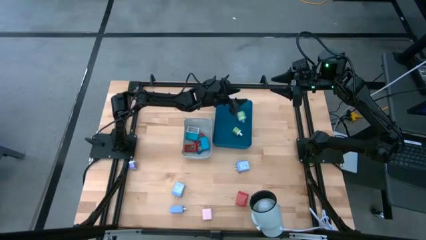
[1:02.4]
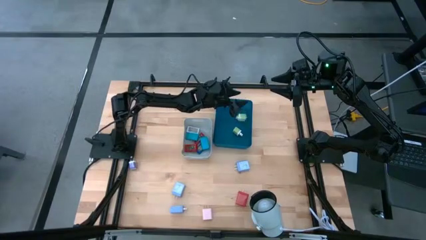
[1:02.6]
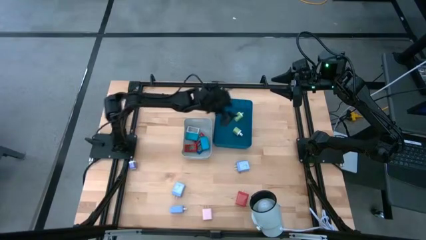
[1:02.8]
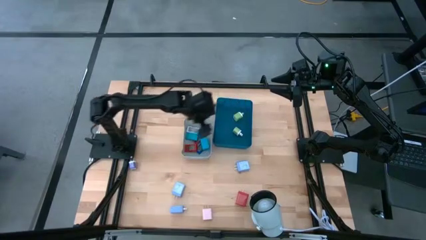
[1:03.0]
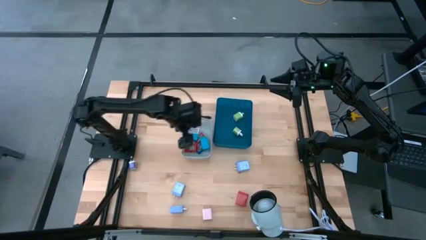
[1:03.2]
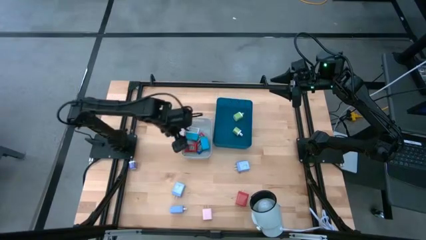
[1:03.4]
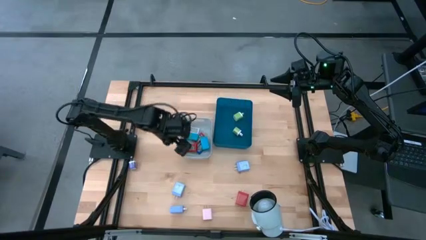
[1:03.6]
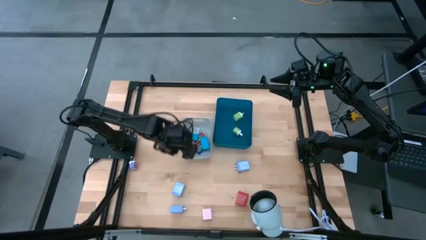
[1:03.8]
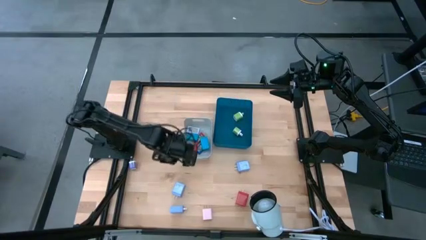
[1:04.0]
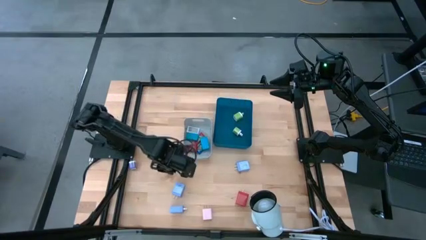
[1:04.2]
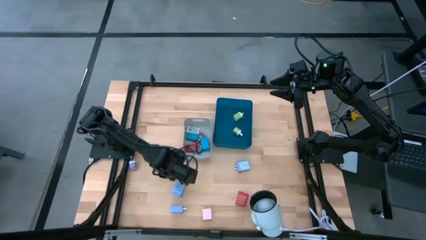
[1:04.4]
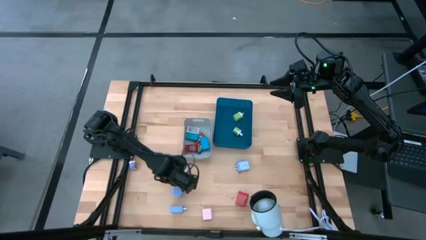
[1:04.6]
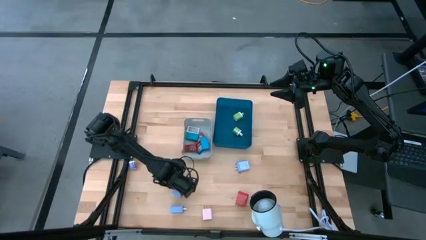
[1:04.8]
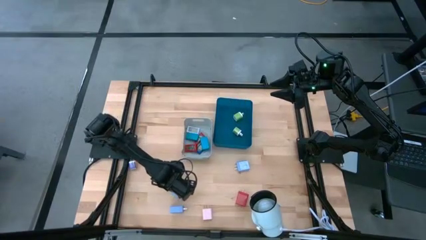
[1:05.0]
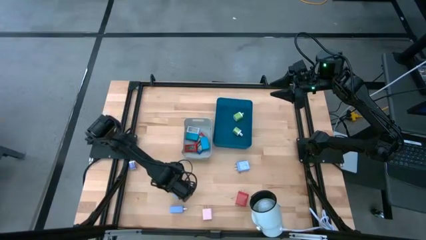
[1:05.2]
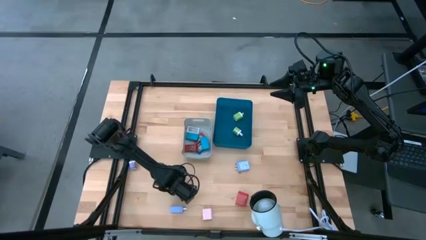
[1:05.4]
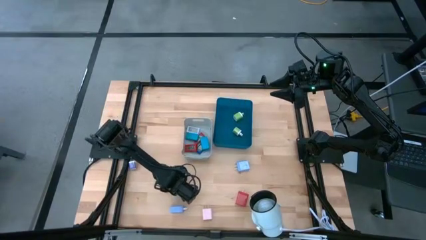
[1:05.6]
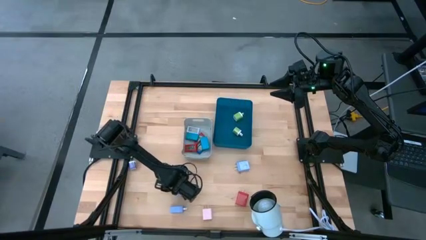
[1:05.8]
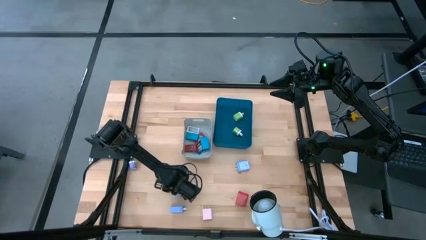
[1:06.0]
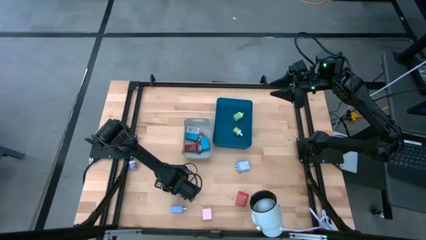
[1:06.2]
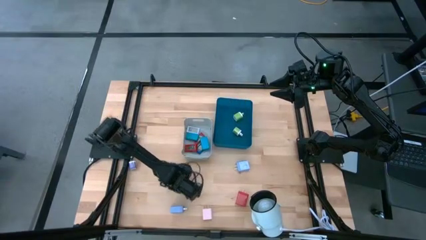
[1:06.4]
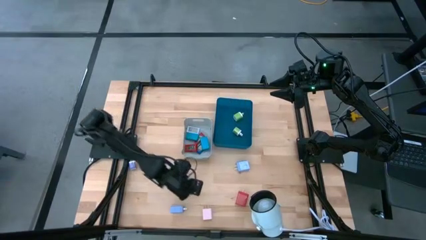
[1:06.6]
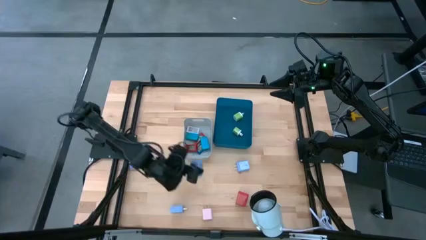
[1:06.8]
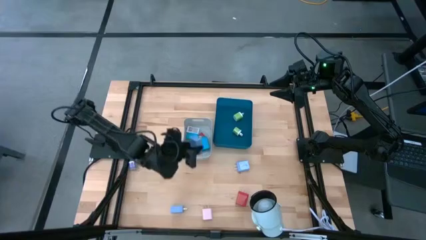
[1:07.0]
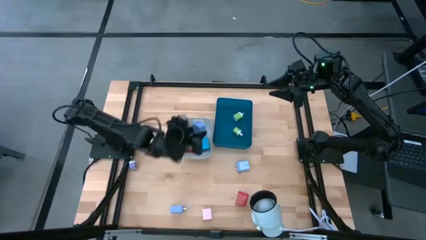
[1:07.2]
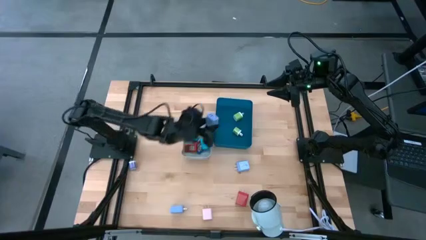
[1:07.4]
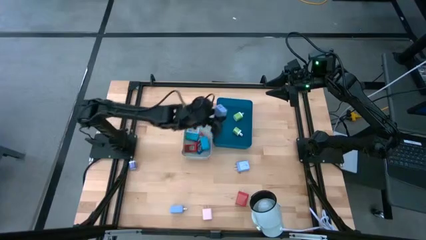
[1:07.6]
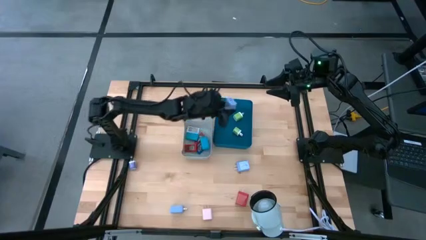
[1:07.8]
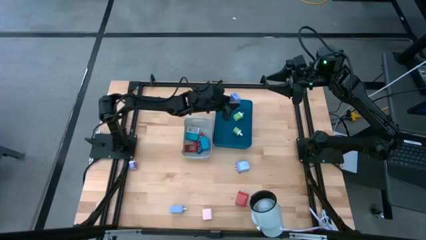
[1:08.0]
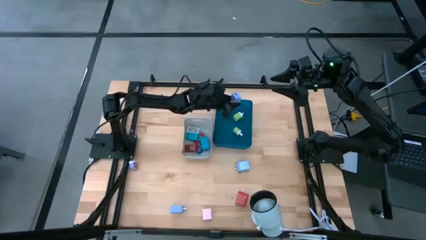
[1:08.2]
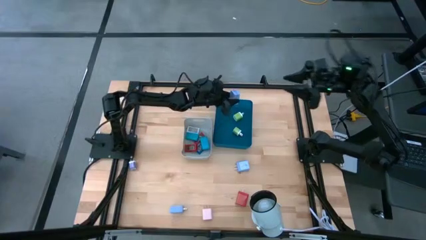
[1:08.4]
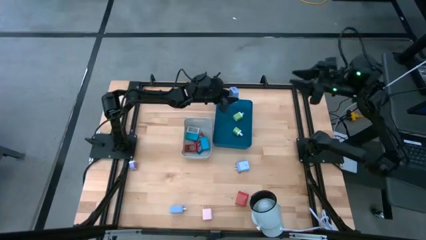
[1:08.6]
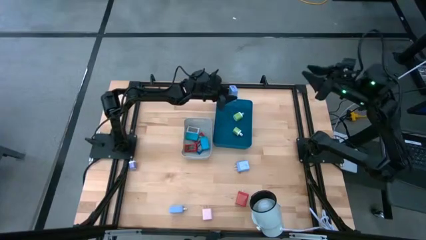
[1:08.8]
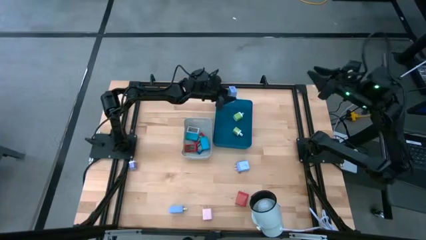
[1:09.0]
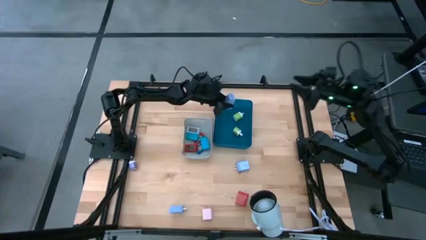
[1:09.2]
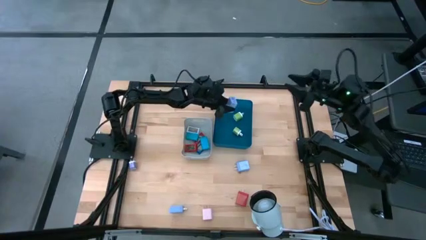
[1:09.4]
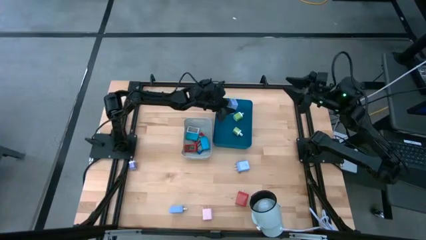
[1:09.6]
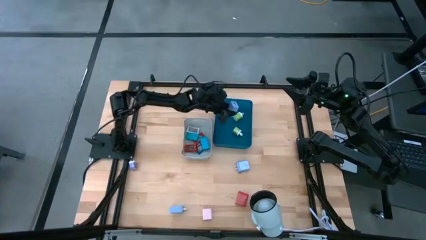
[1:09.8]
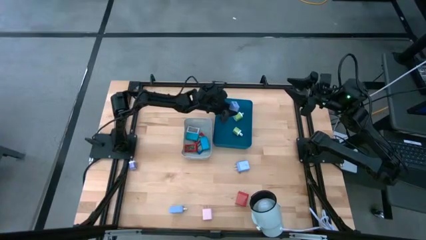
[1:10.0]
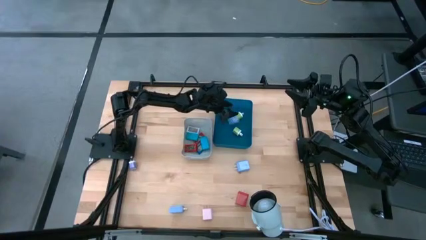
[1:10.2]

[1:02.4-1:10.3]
Task: Pick & Place Office items
Put the top left light blue charger adapter into the blue bin

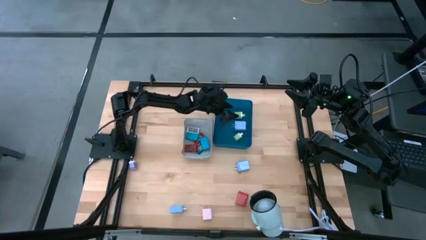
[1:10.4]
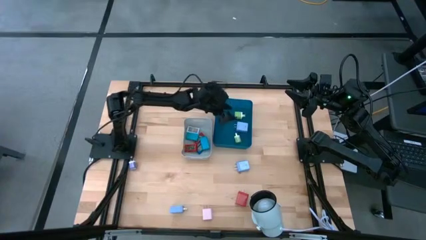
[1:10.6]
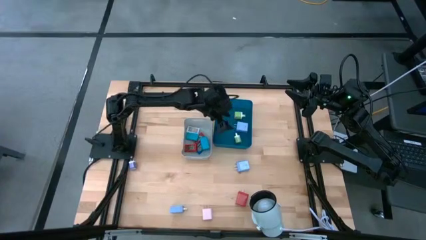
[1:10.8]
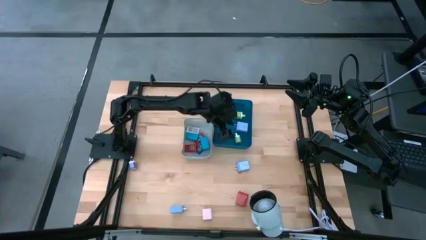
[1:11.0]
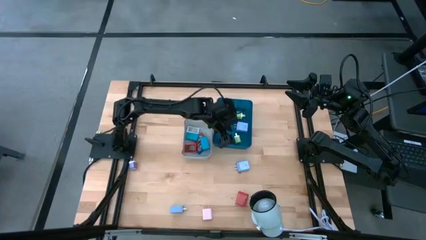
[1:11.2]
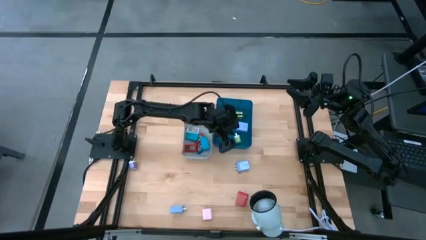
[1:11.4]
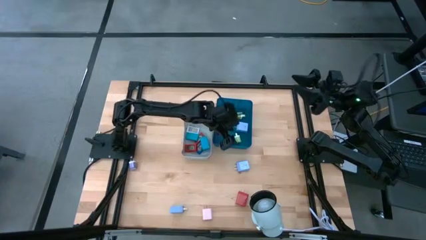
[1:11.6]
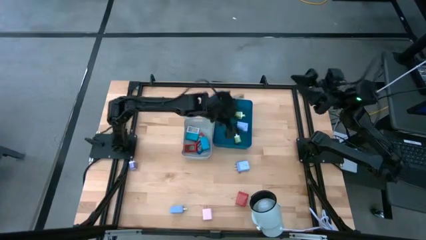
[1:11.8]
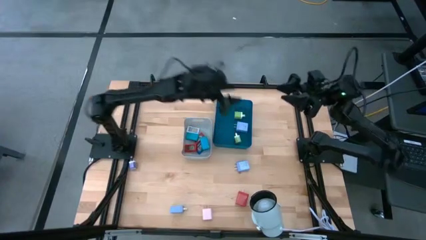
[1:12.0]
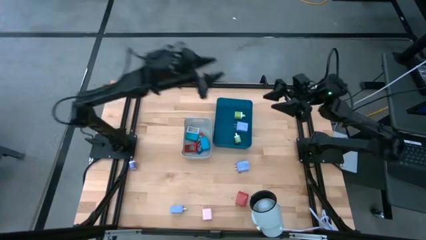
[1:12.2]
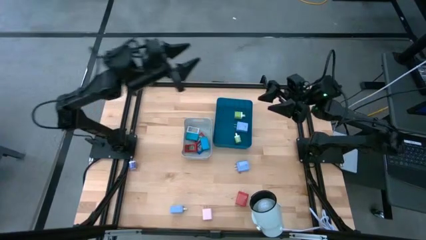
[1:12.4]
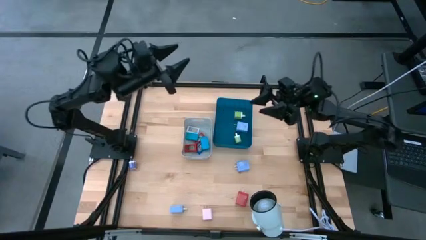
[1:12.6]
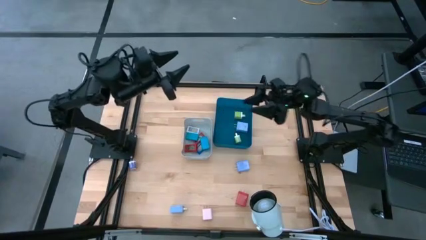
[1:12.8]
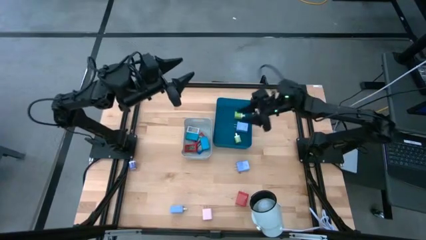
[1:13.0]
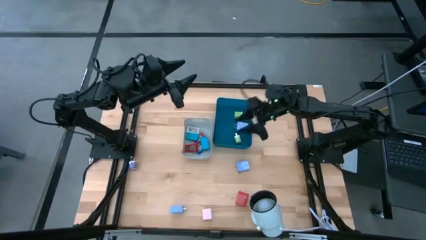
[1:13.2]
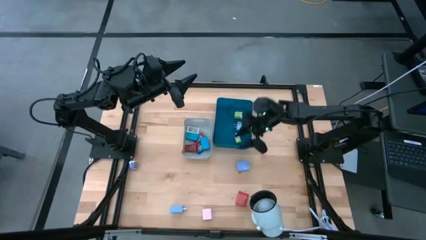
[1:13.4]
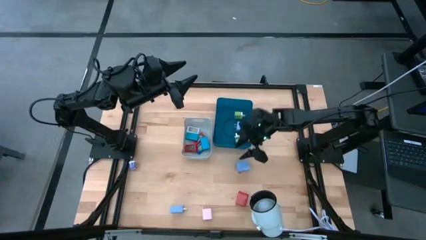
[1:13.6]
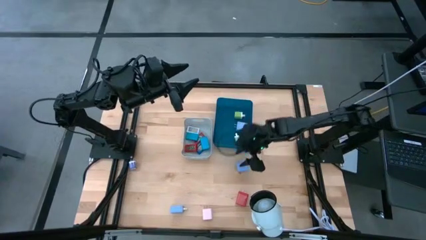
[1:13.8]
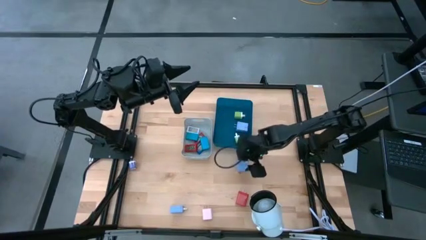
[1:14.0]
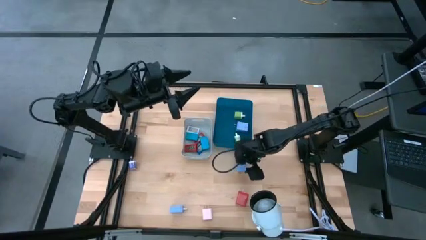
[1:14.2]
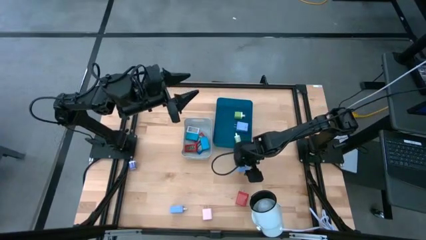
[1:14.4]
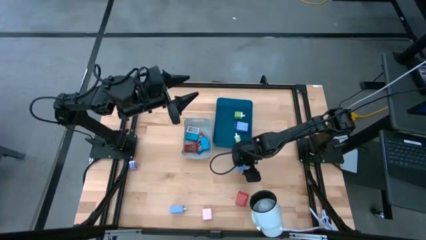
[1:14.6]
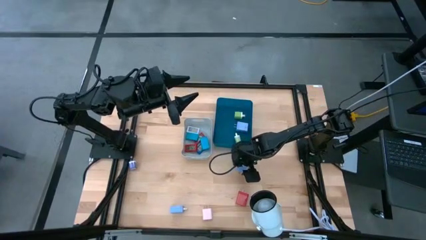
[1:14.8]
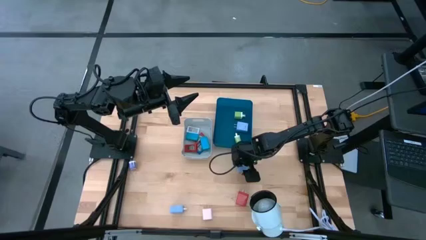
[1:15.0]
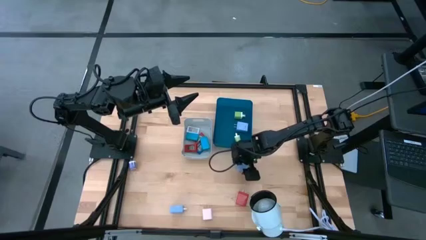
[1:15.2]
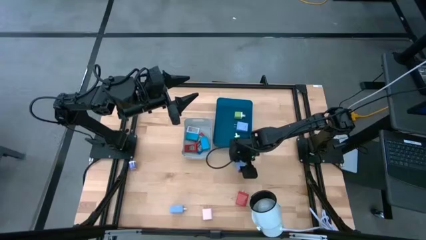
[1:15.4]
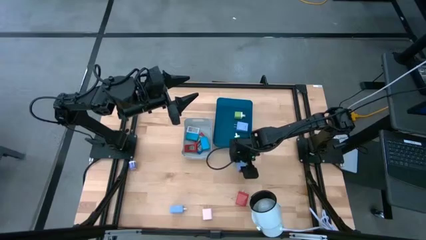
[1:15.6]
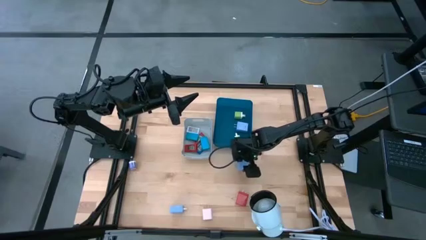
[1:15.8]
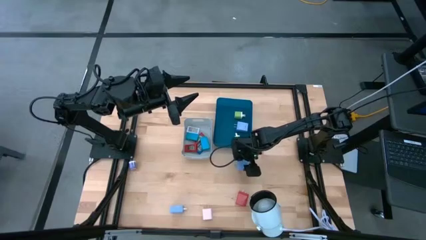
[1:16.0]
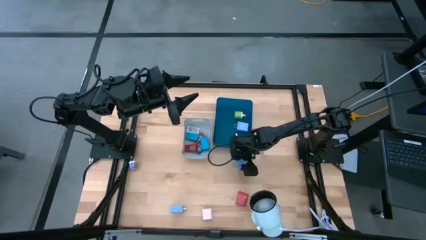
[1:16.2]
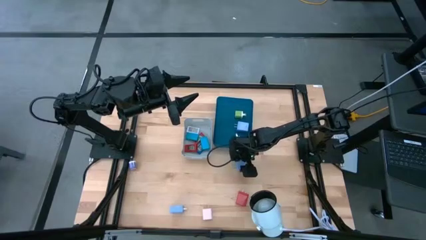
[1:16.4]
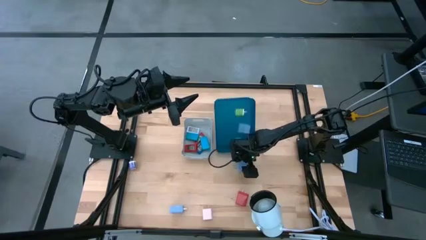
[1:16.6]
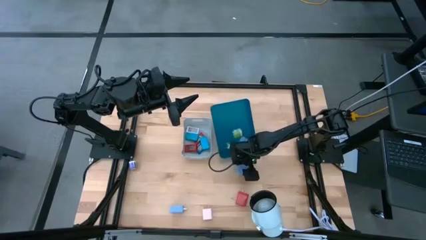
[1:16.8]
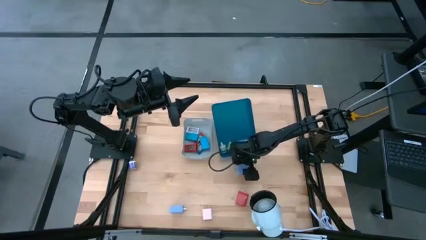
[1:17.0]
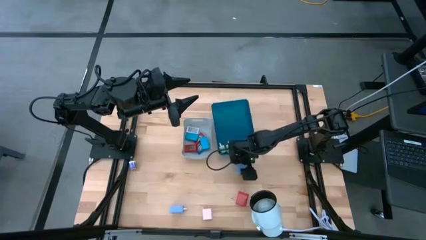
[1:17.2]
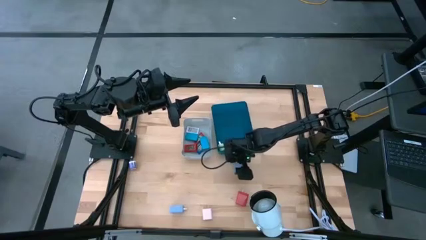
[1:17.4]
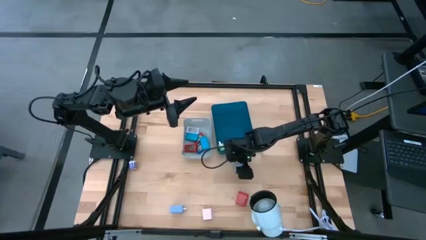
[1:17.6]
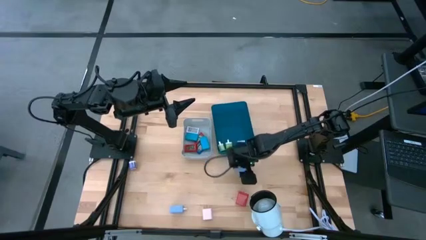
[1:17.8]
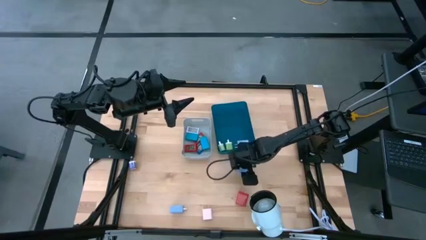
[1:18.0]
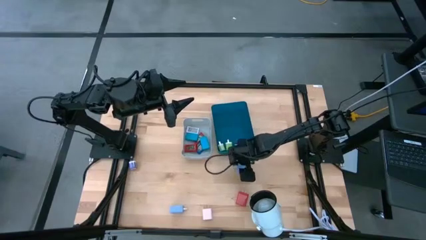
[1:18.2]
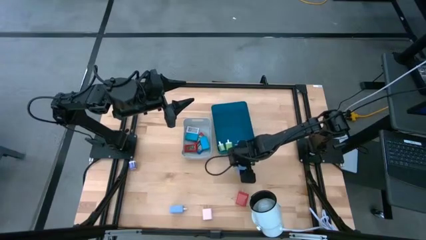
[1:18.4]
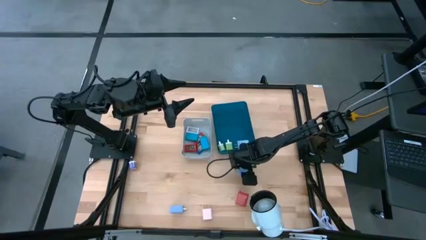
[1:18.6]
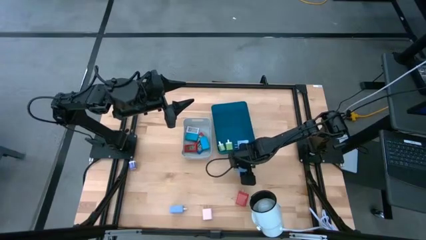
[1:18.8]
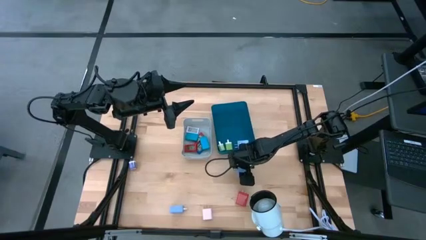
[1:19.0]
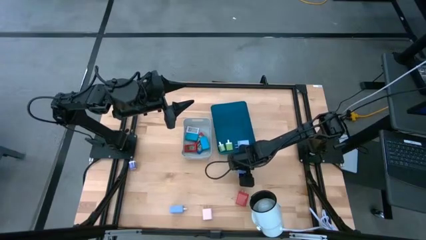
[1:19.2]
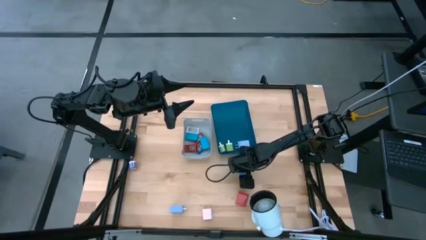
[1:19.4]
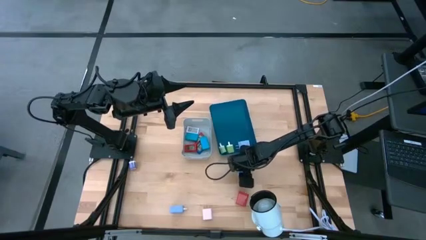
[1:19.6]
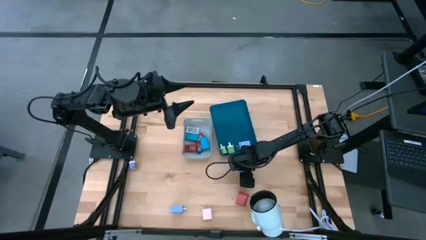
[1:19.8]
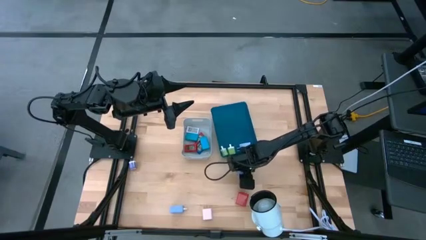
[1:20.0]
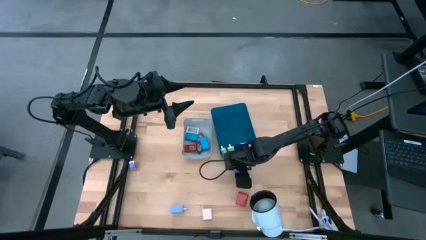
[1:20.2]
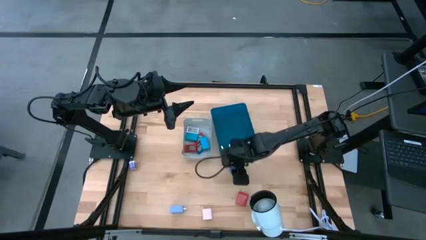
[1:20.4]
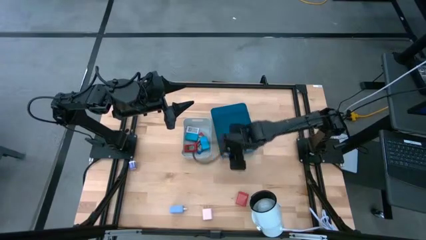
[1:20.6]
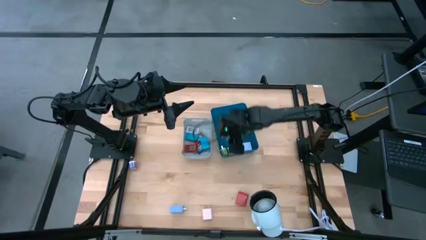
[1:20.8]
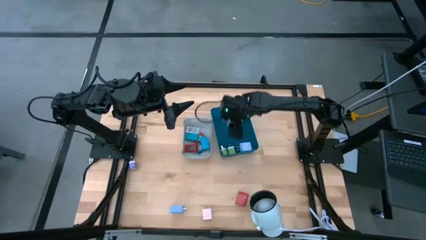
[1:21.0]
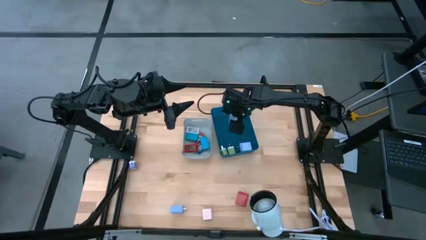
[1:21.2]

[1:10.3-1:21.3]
Put the top light blue charger adapter into the blue bin
